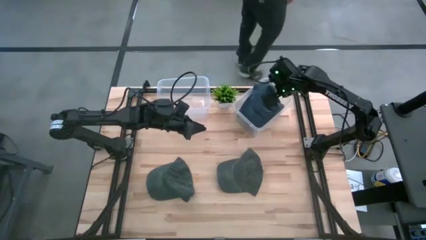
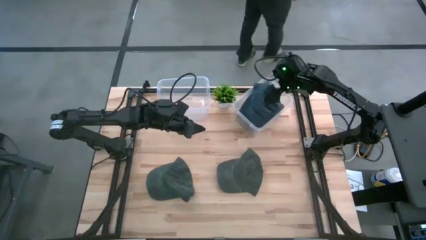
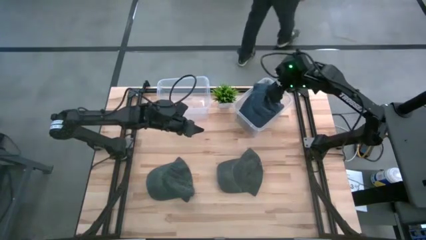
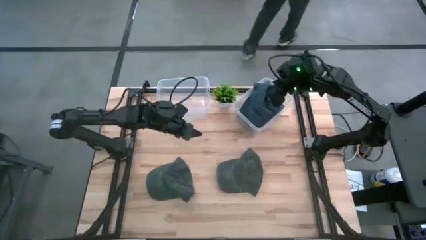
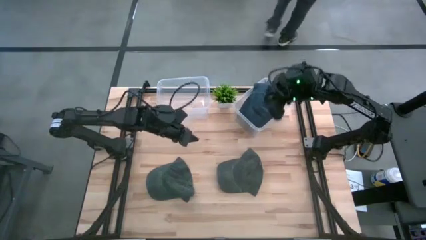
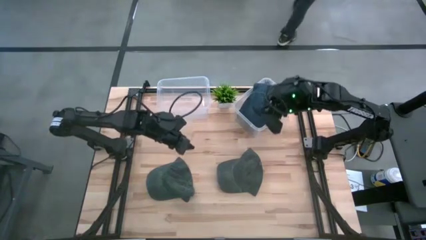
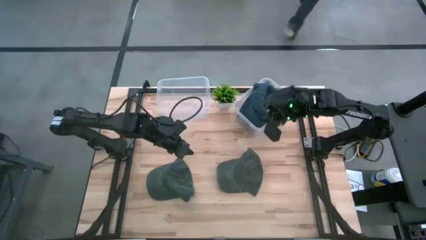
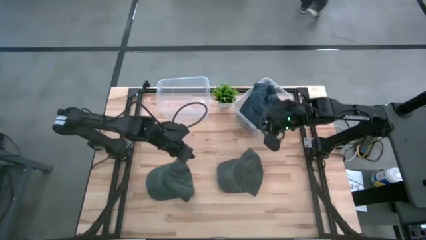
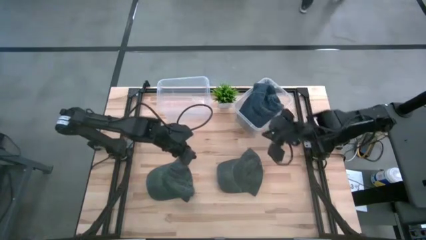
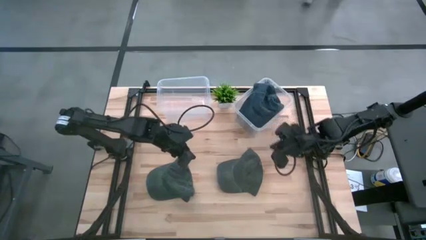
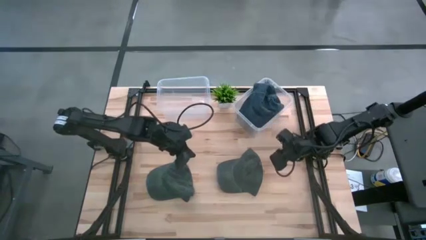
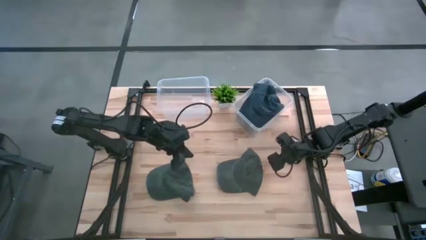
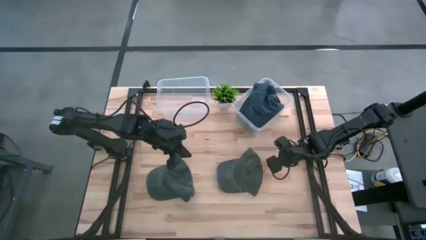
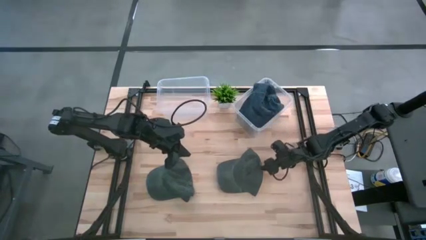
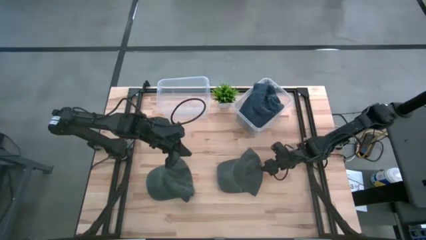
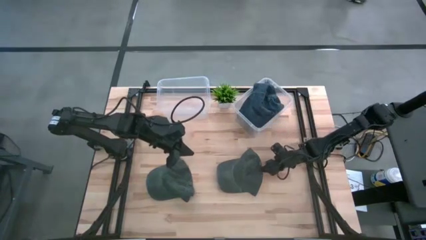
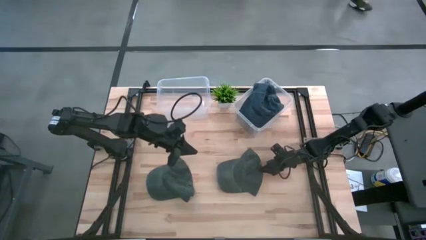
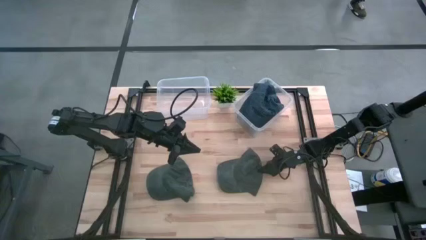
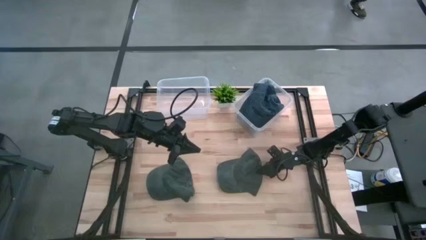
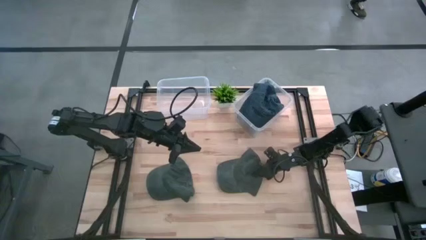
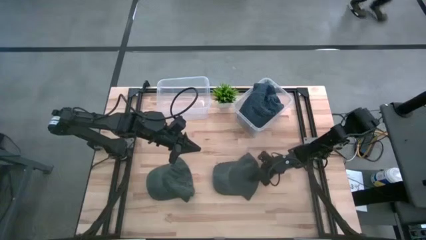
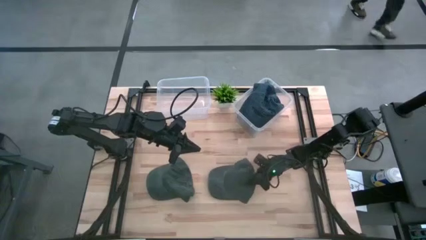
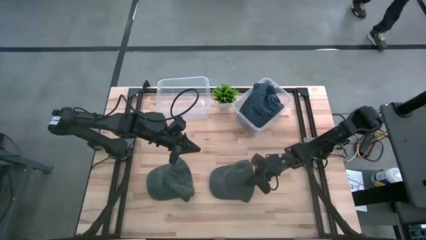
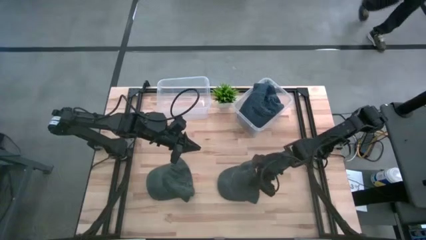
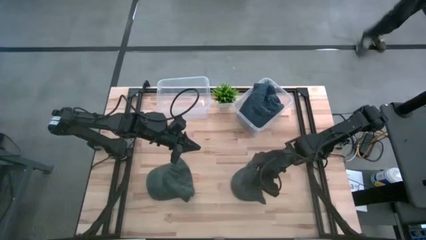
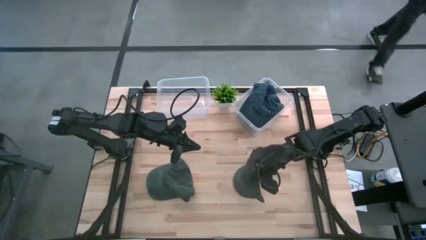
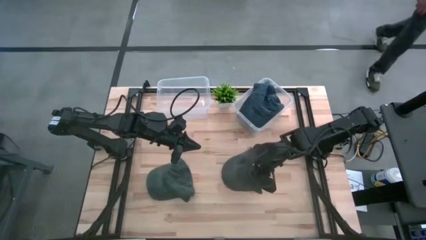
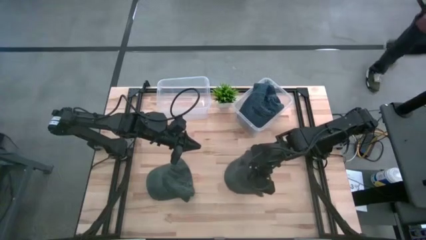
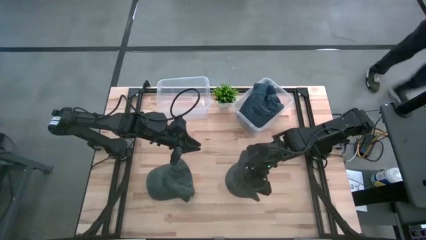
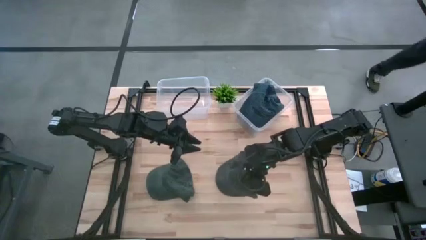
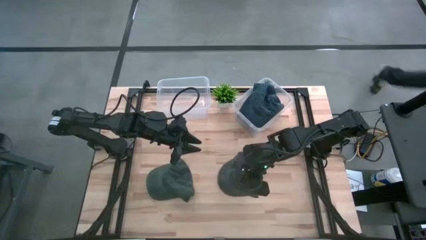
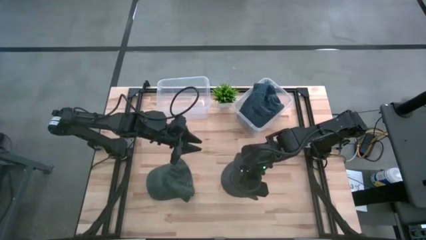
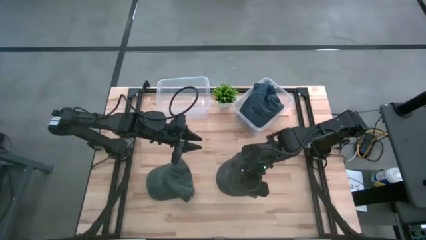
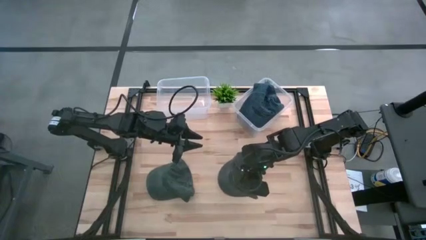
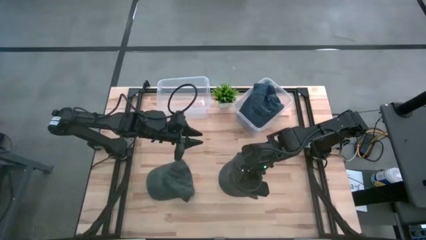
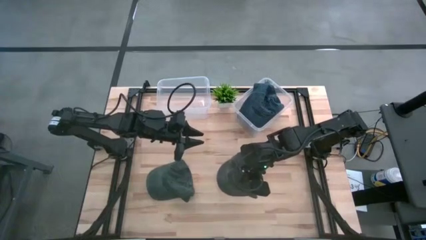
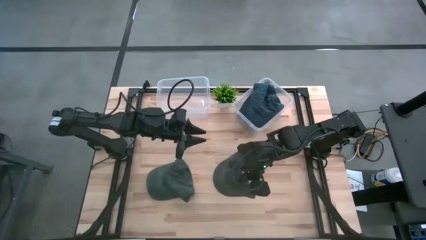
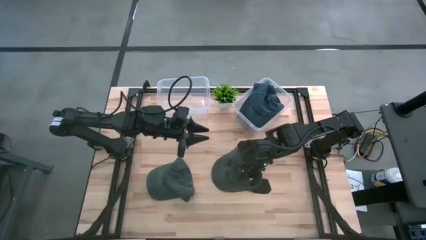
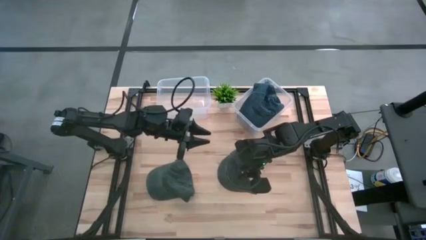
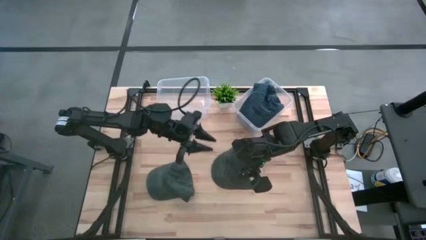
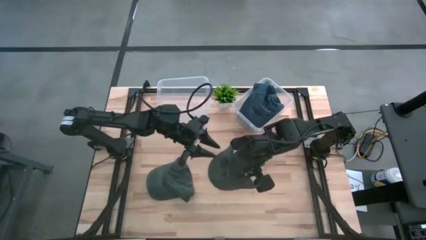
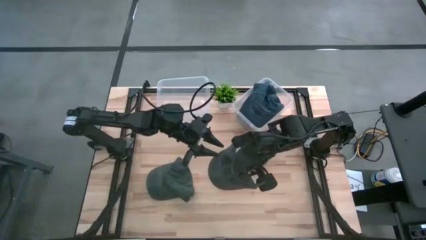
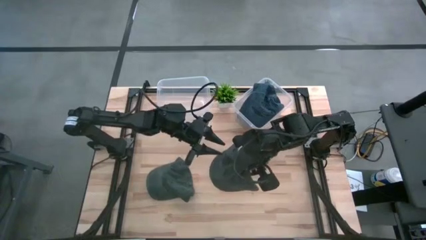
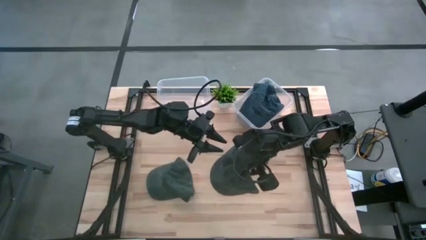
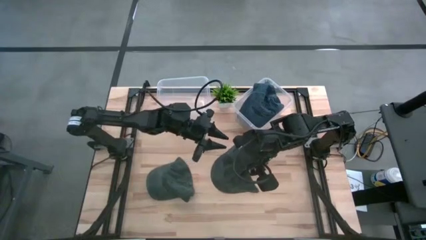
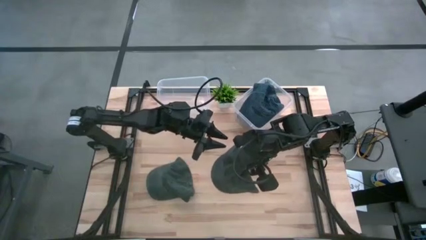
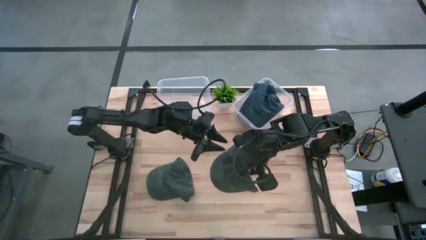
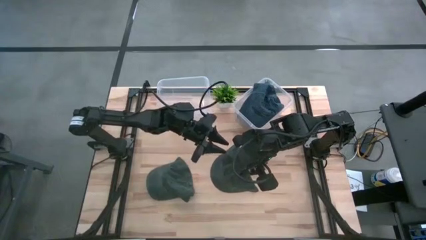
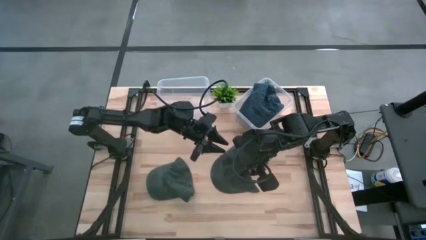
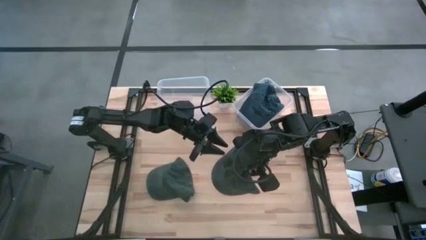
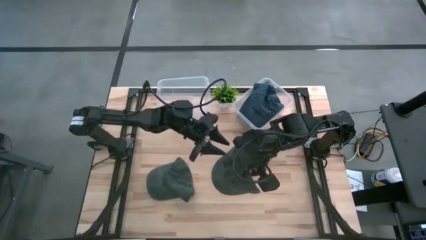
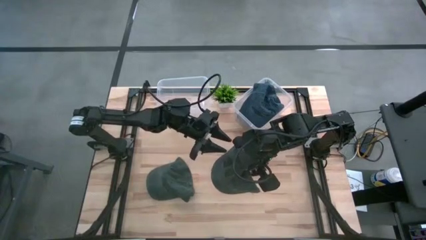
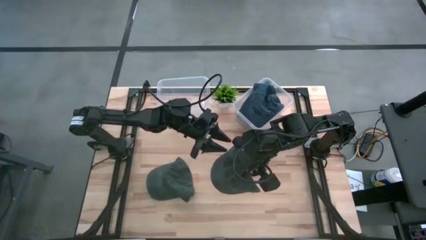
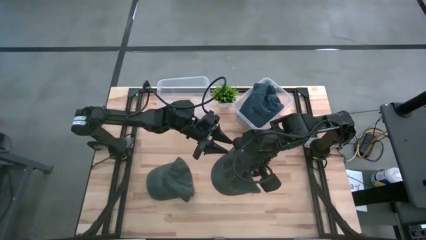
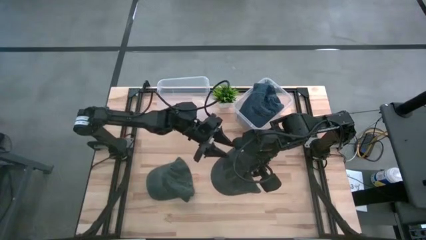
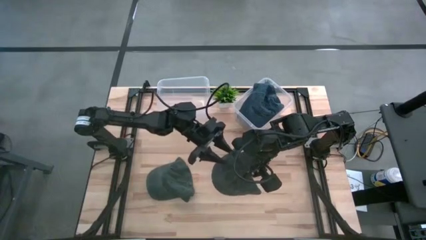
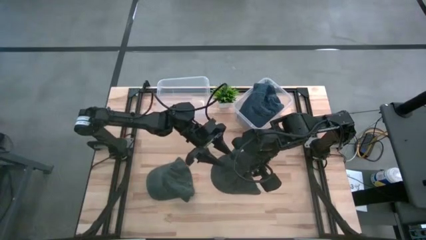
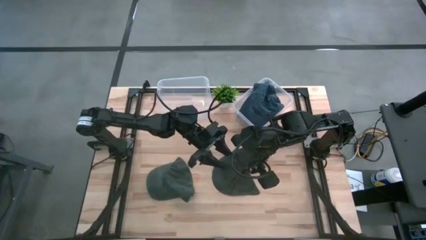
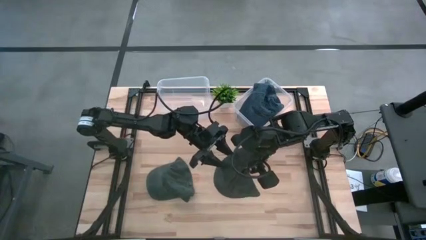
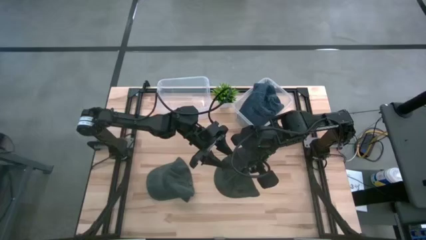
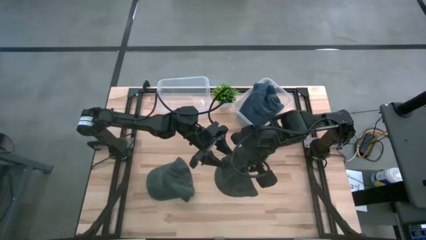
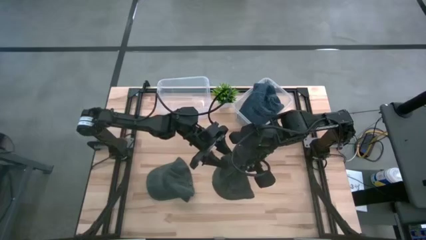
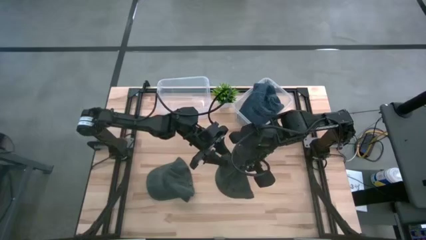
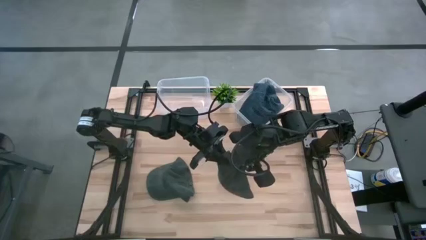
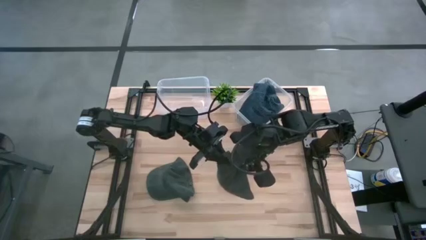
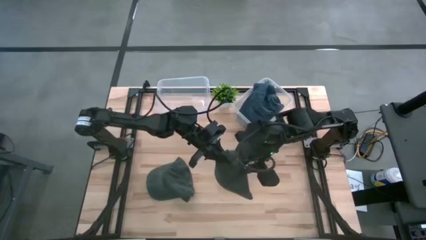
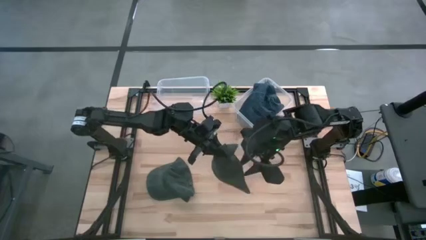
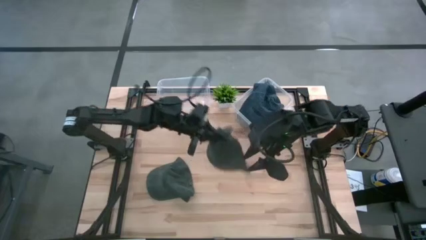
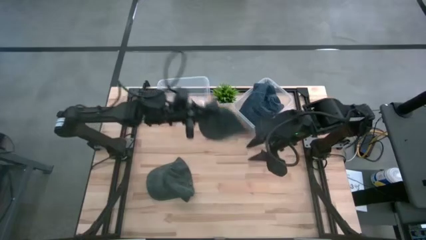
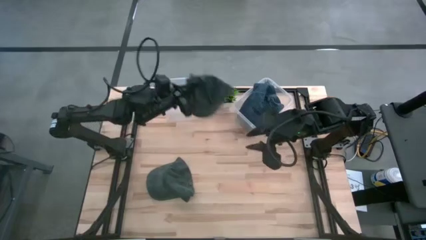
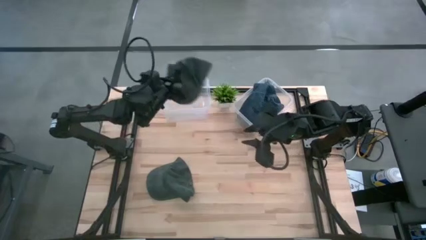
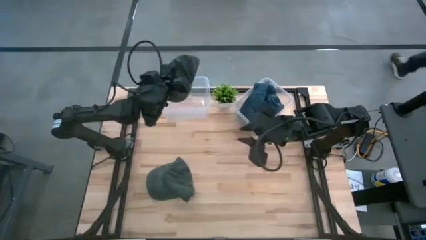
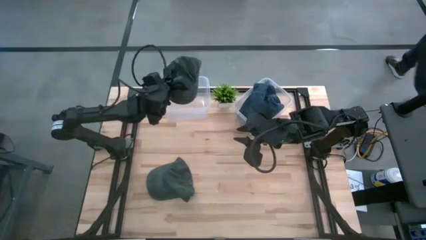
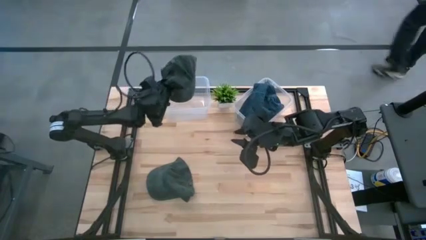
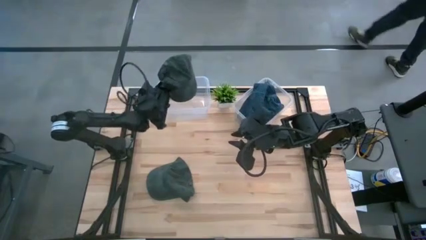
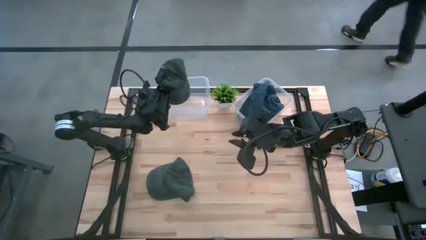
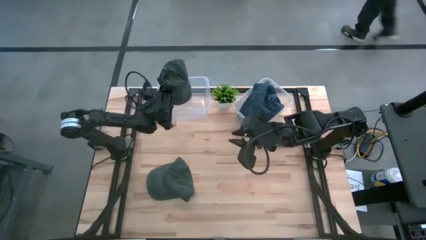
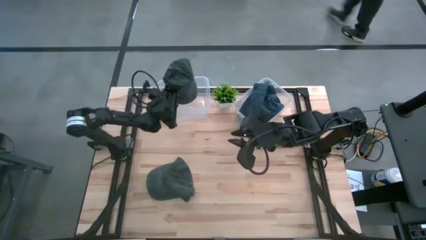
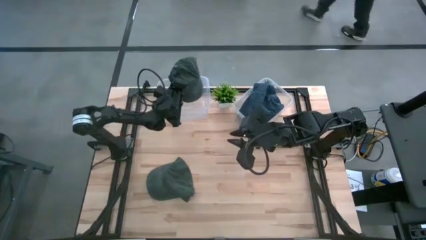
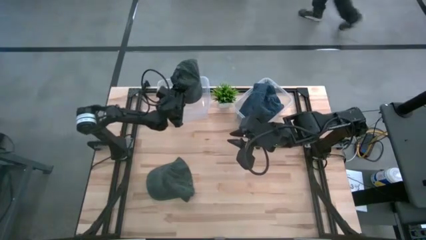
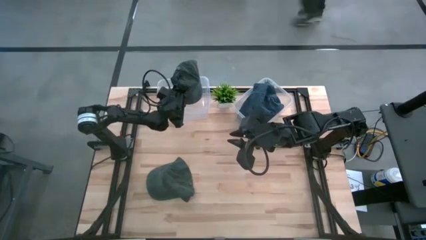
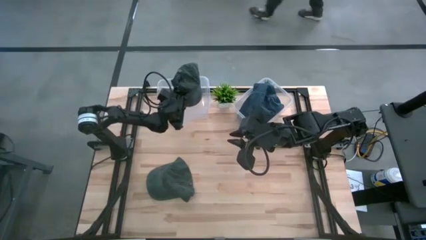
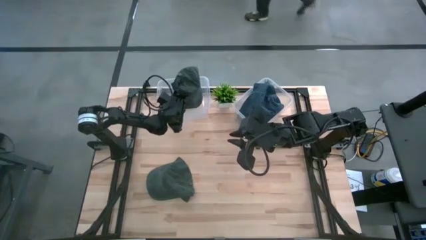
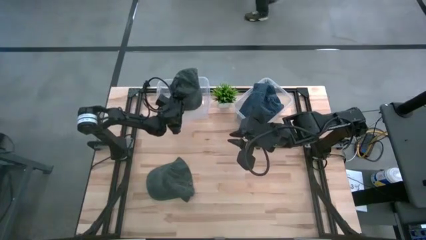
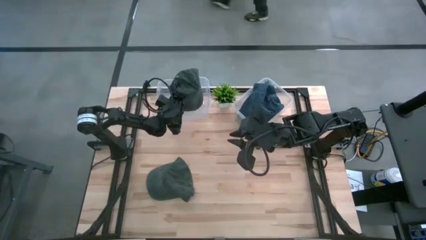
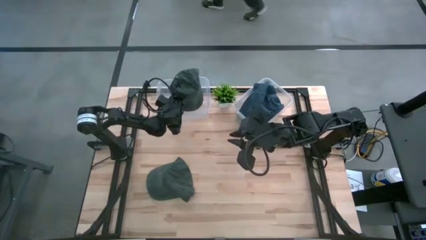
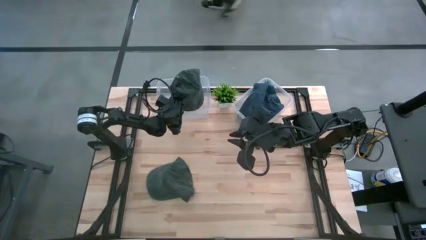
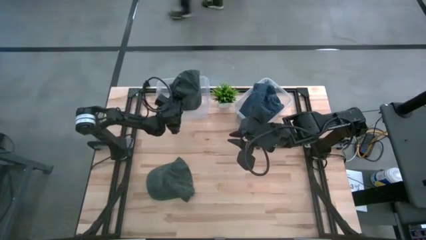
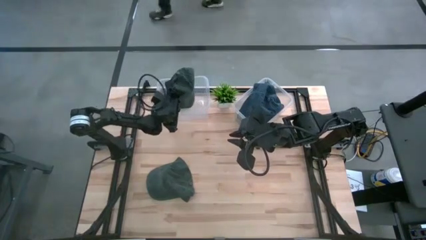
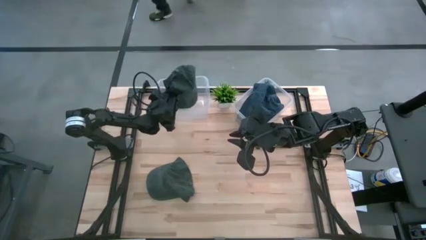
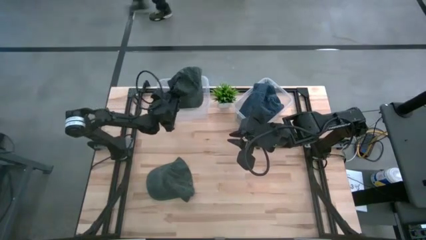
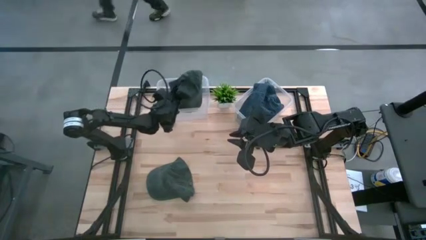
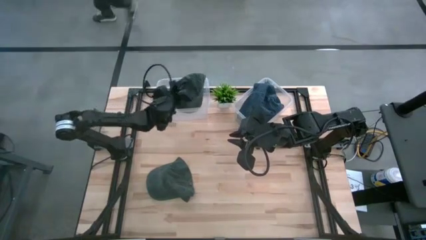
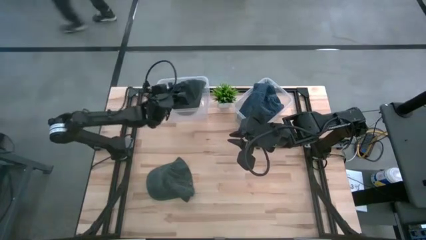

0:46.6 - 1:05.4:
Task: Pick and place caps into container
Put the right black cap into the left transparent container
